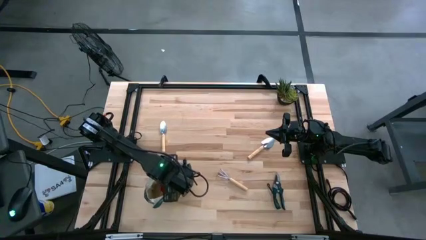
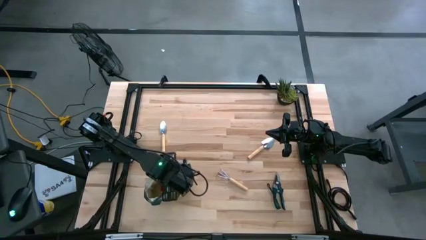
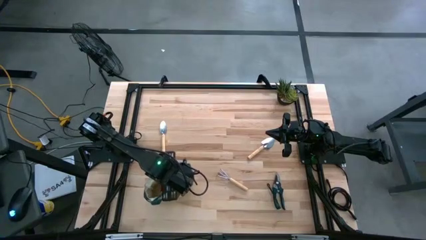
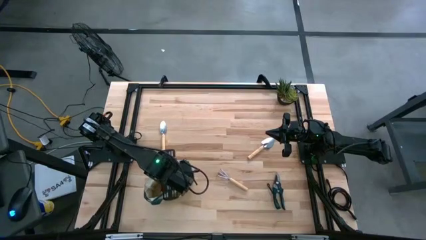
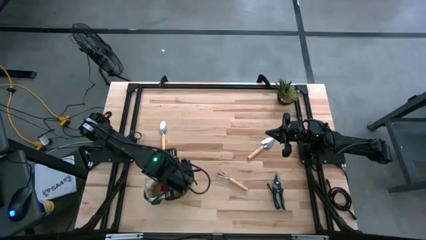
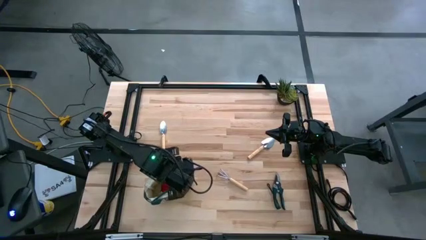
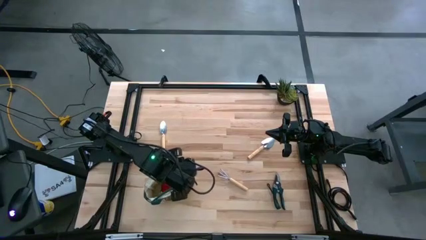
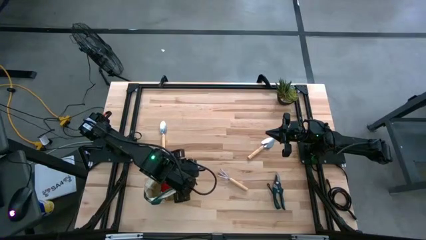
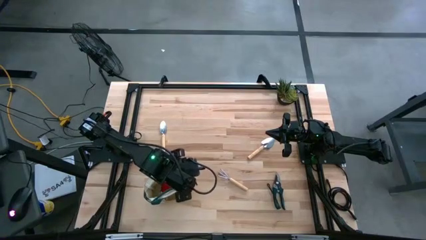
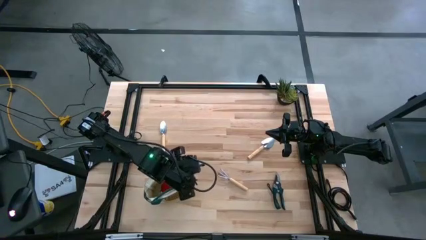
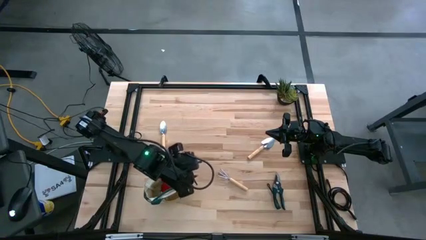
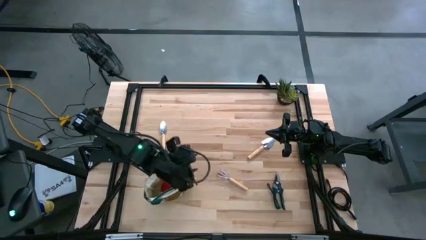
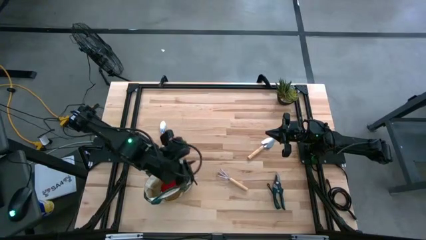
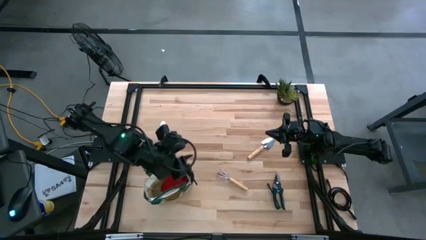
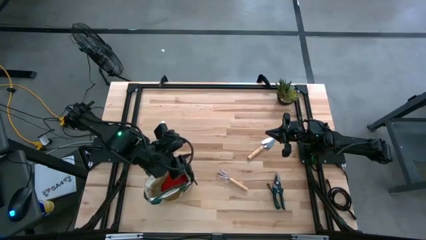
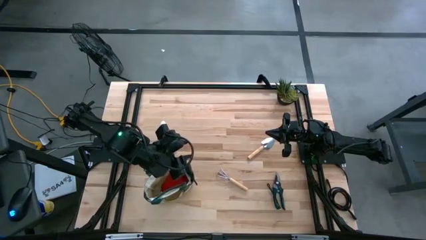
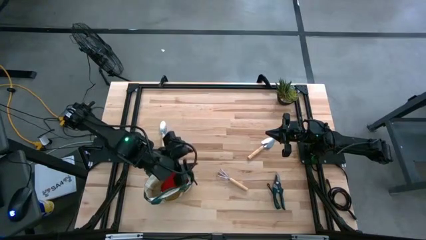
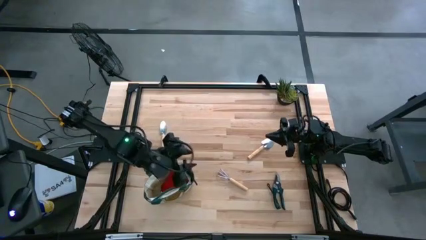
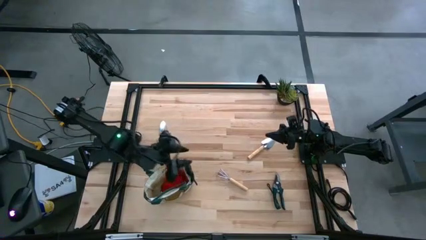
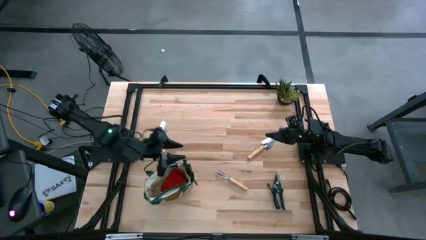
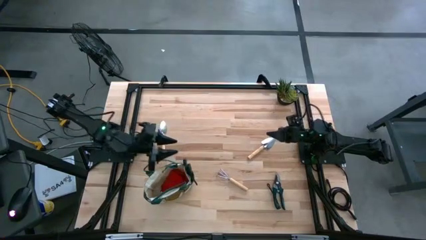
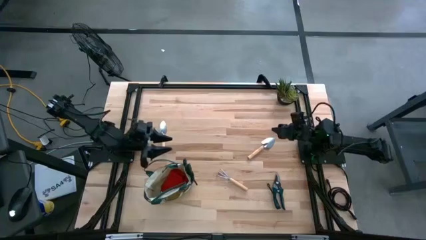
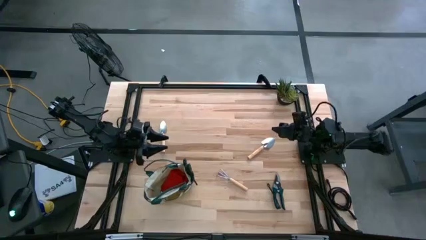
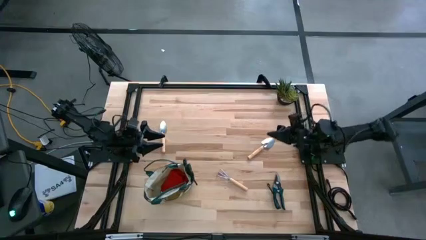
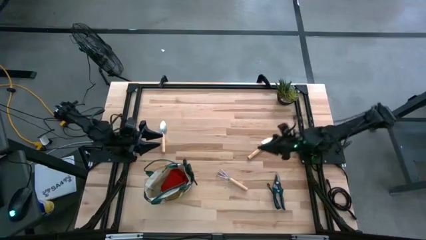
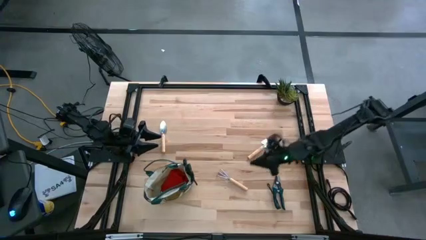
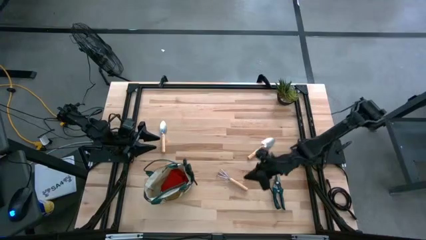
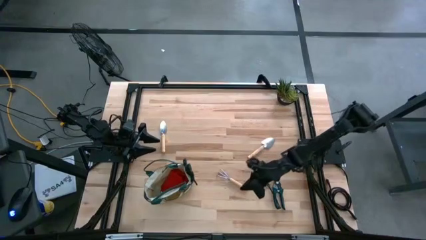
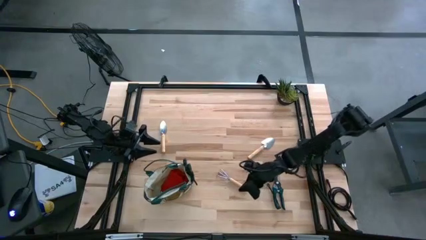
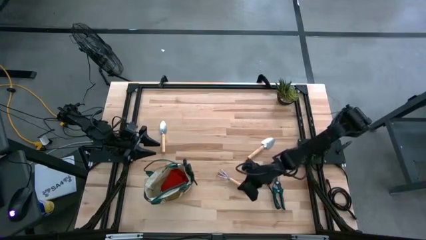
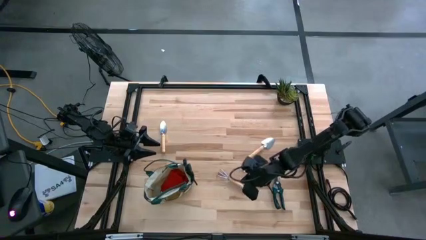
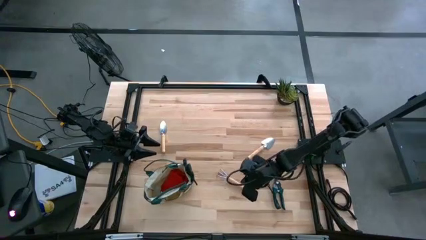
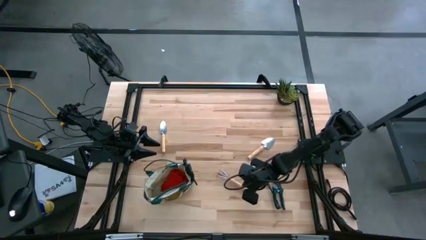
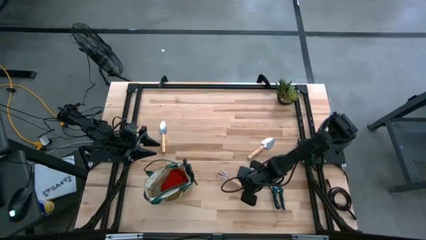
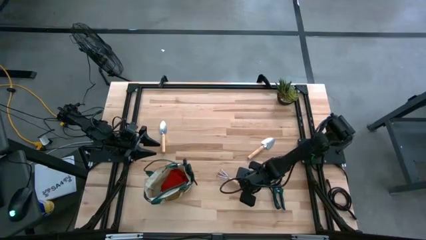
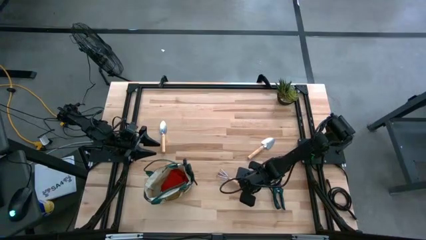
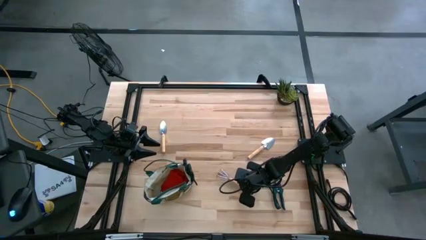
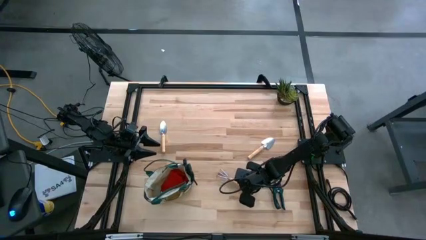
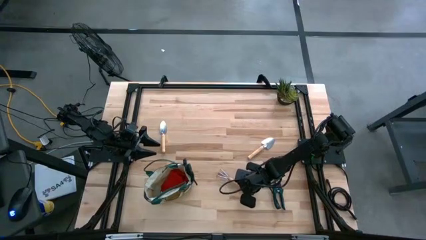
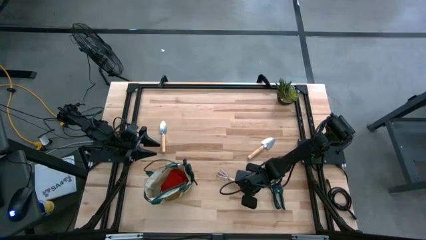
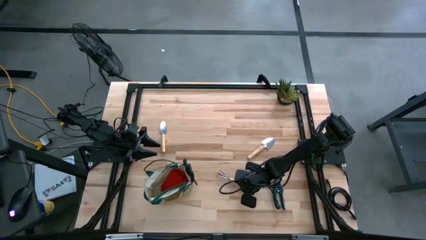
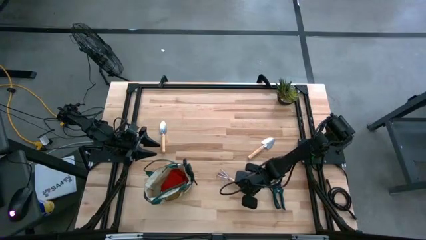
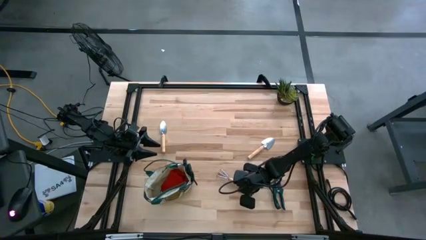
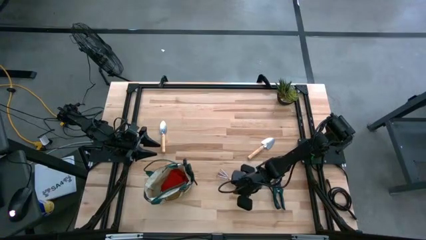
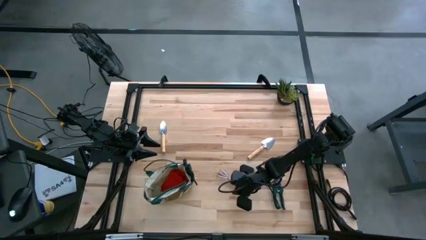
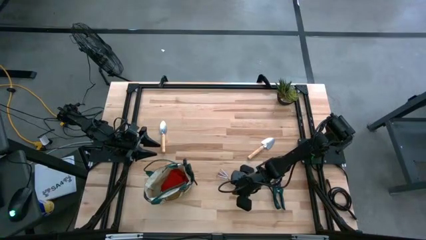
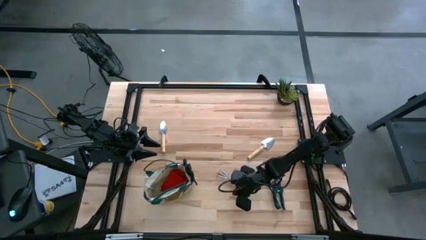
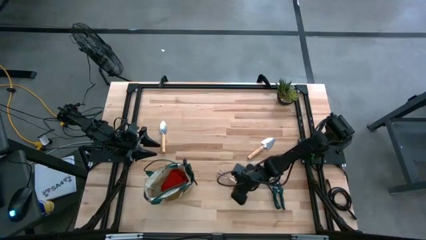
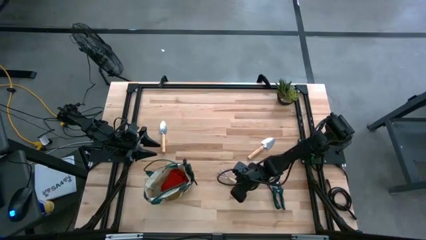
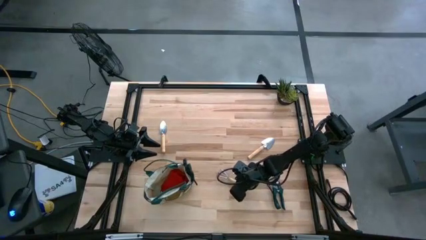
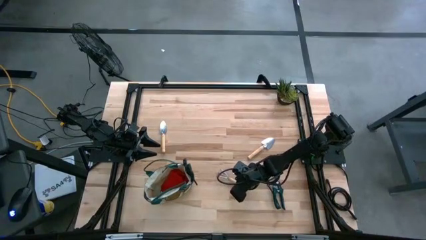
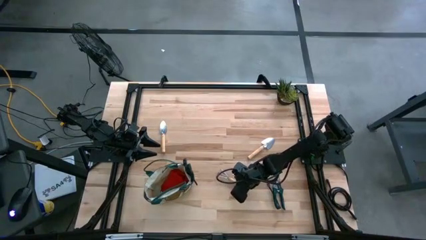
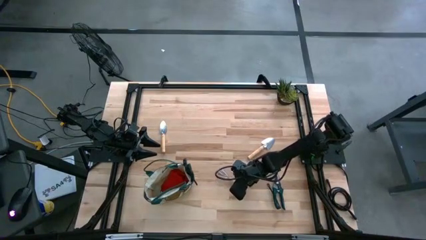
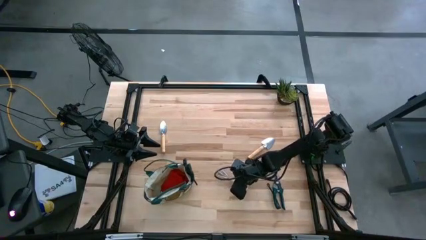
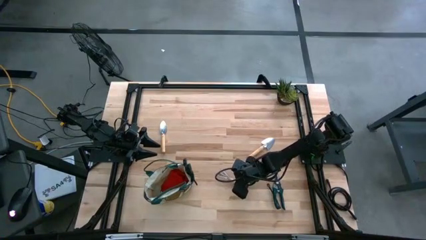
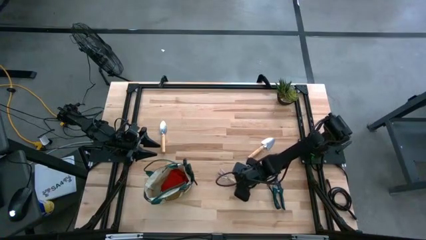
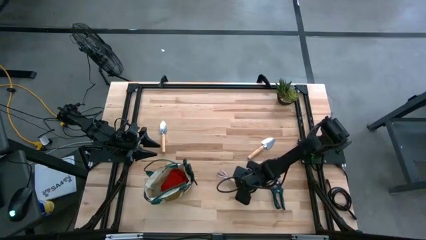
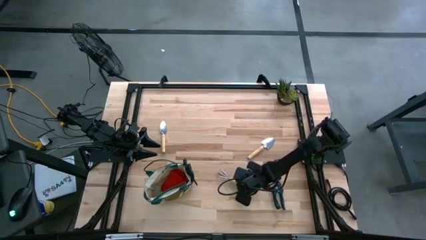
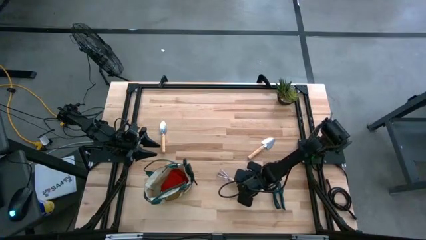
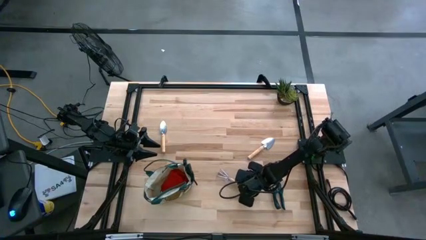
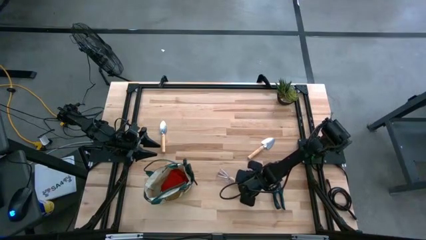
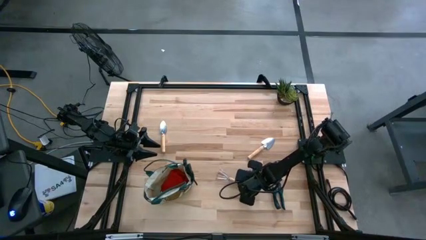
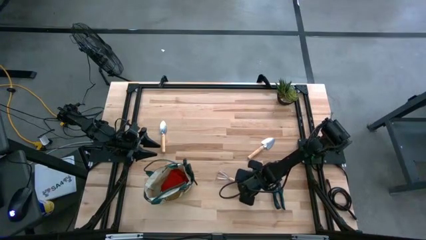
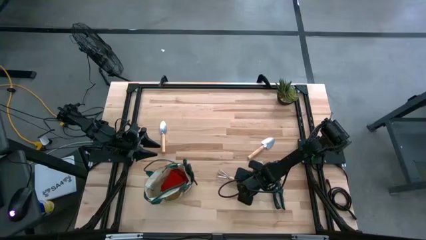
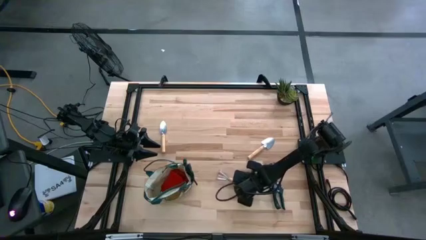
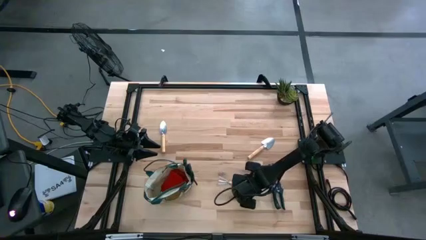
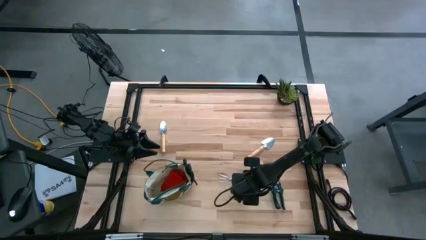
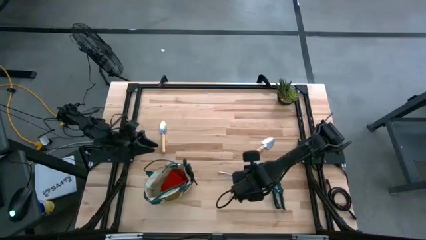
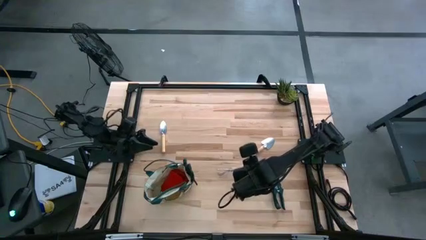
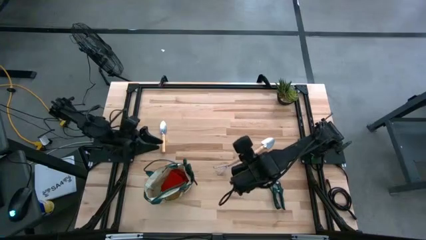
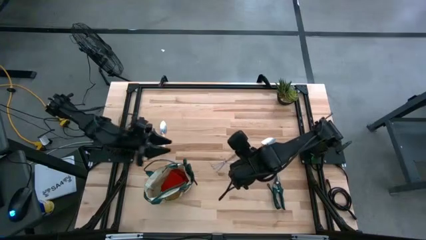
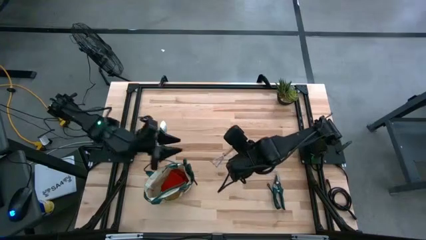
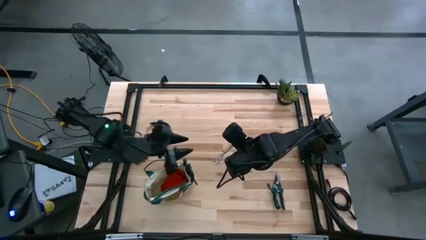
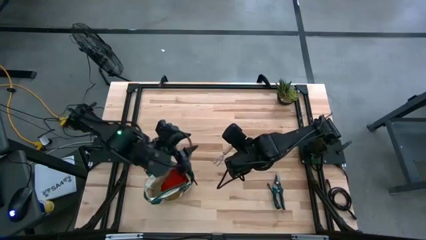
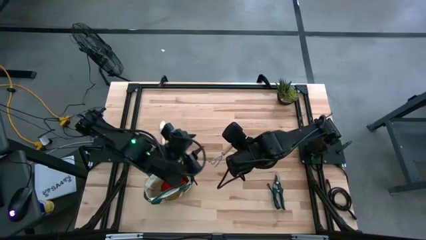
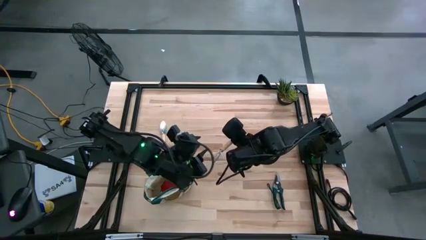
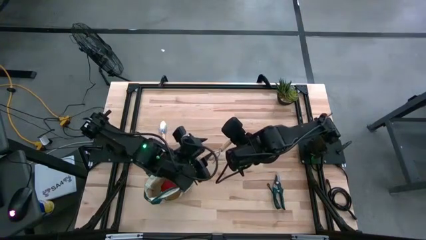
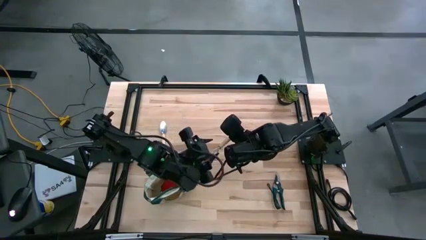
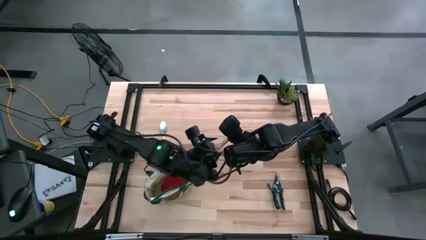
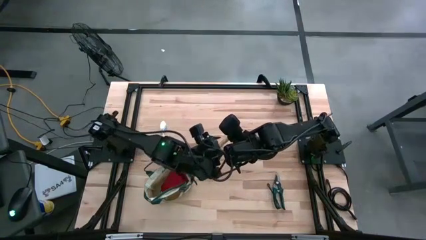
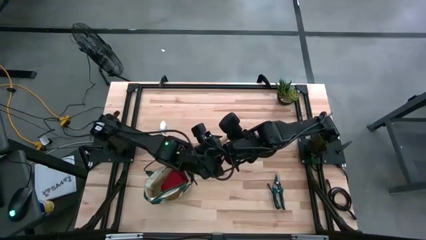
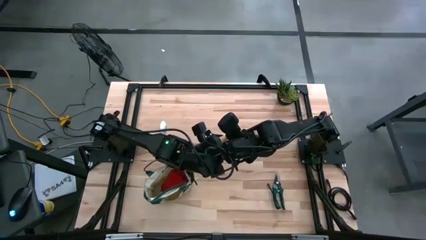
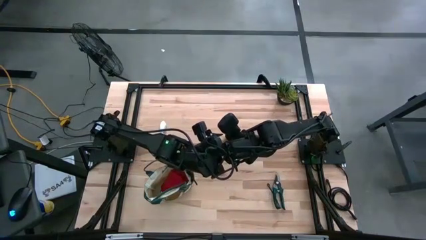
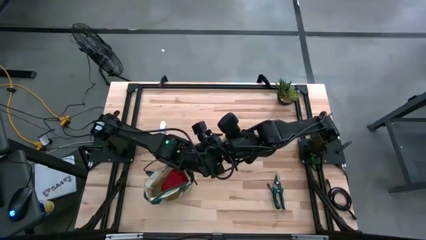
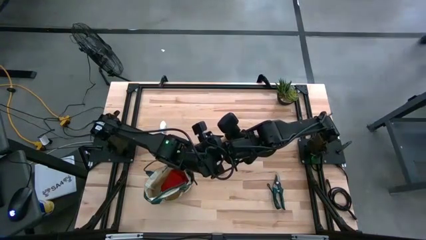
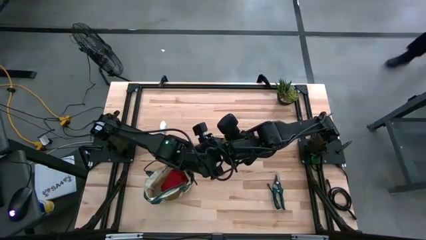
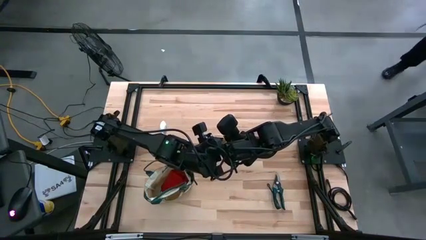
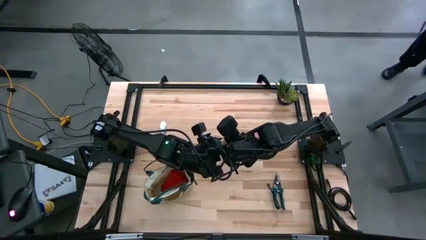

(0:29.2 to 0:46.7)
Task: Pick & Place Garden tools in Gardening bag
Put the hand rake into the gardening bag
